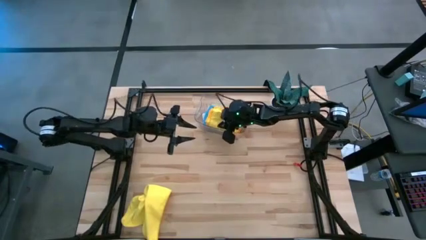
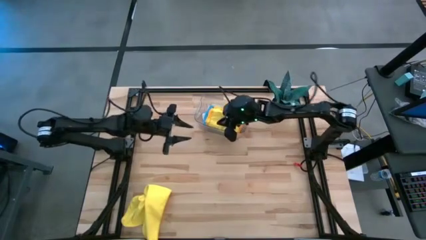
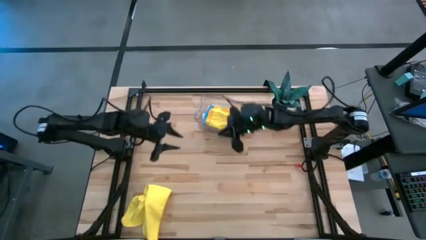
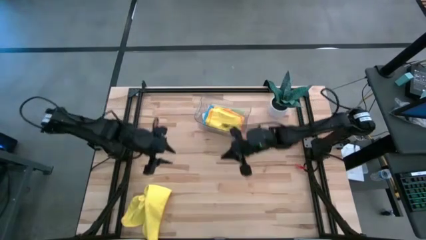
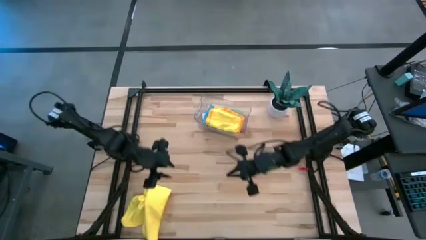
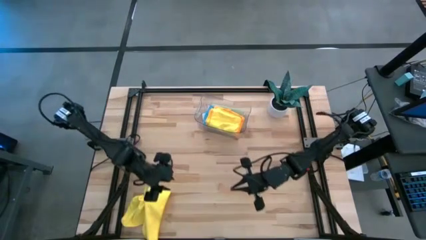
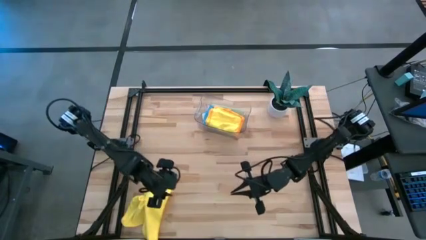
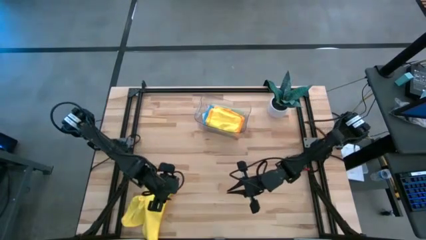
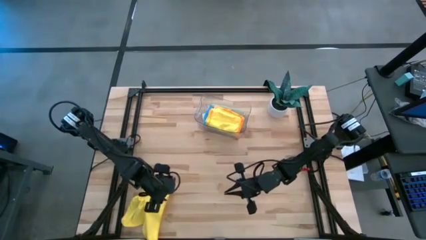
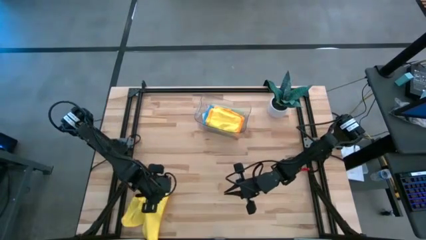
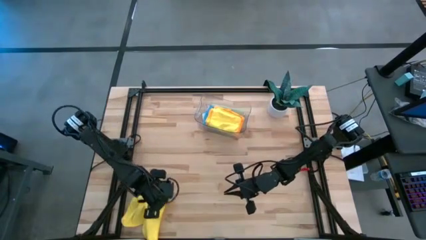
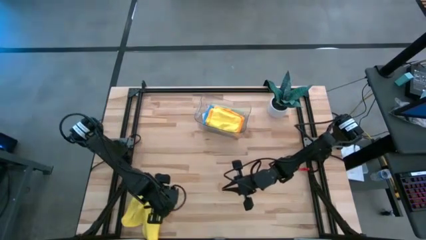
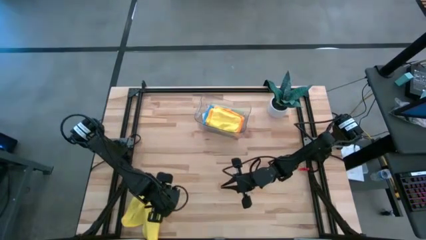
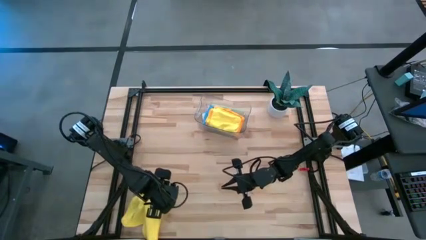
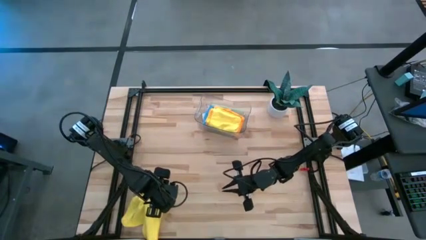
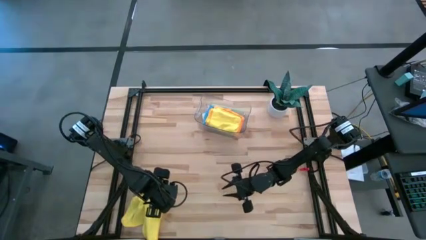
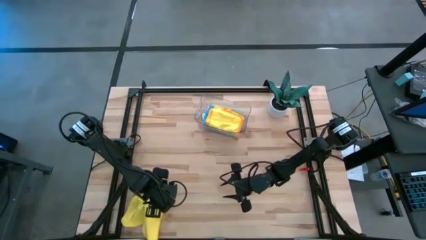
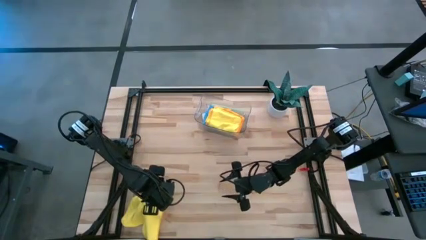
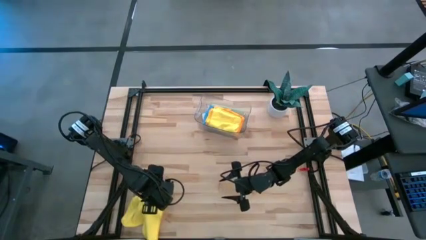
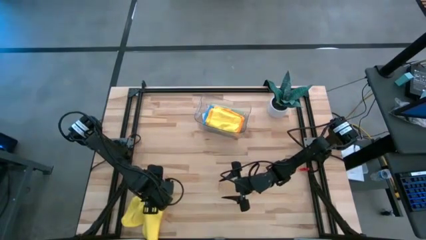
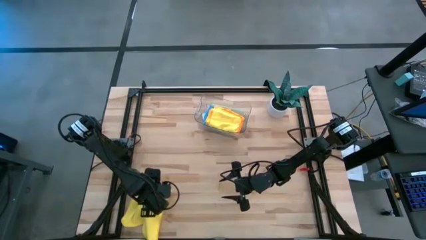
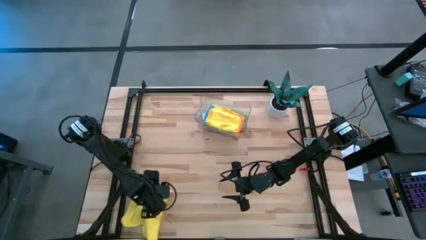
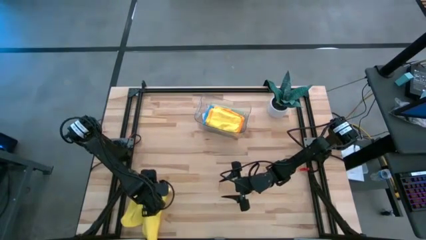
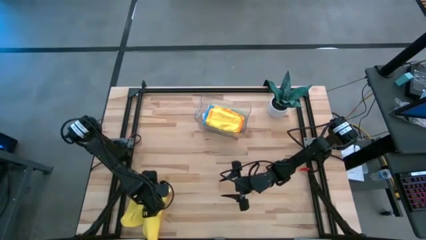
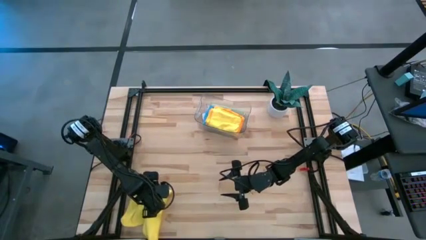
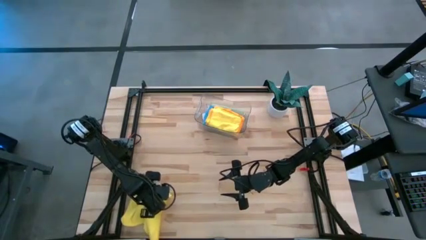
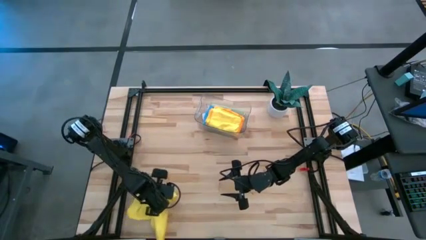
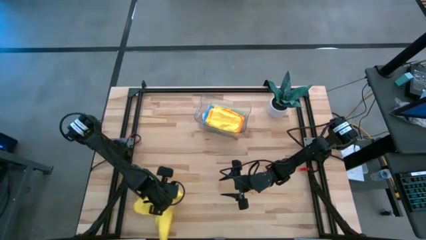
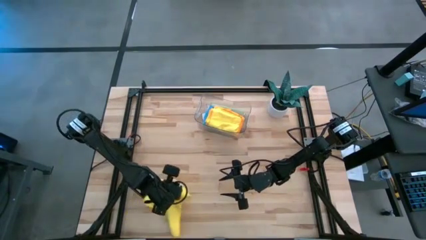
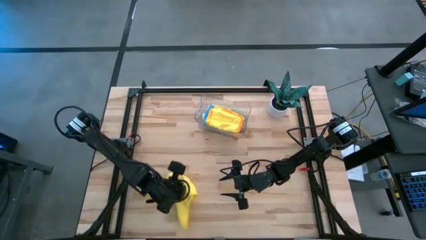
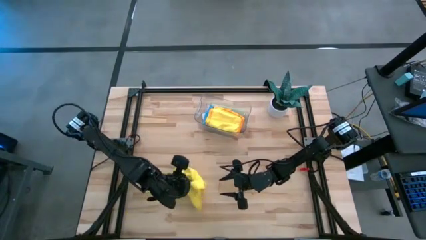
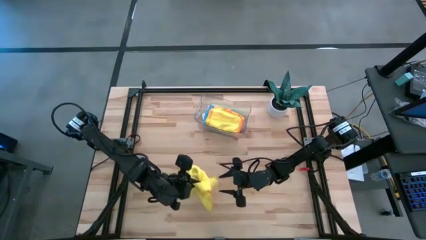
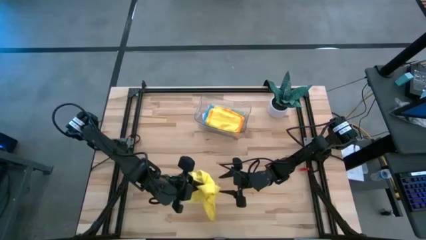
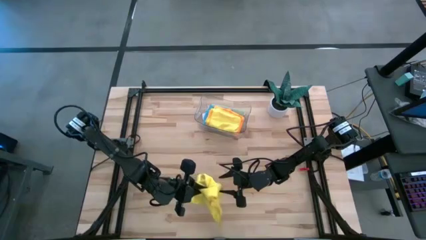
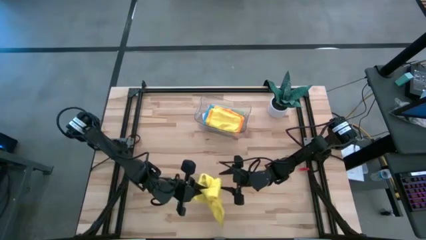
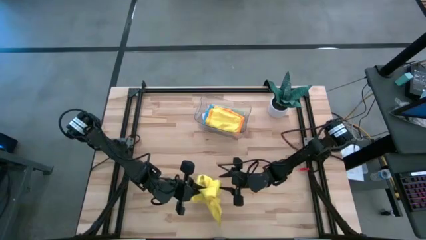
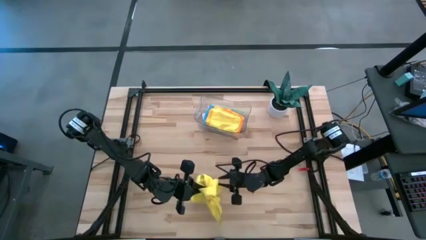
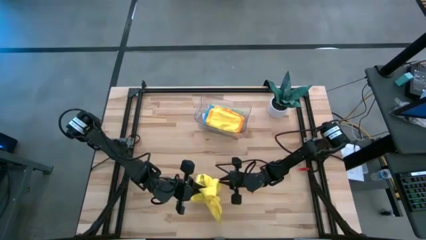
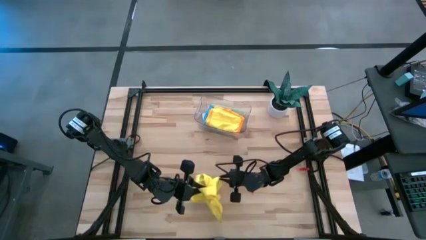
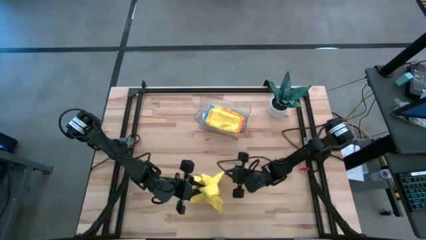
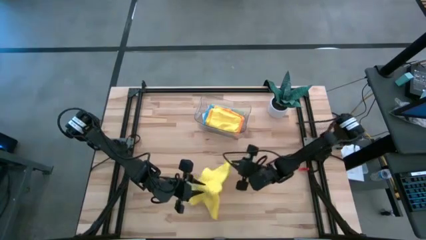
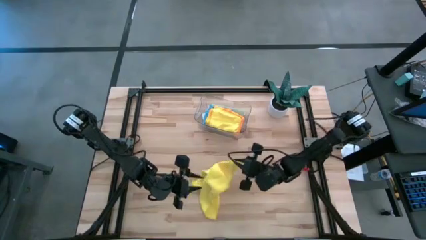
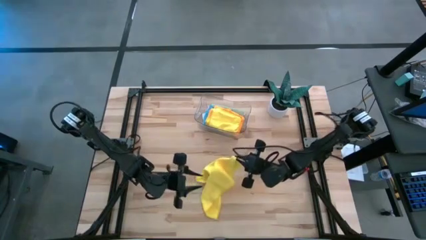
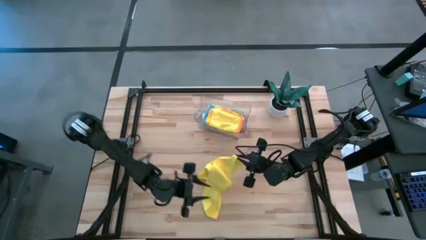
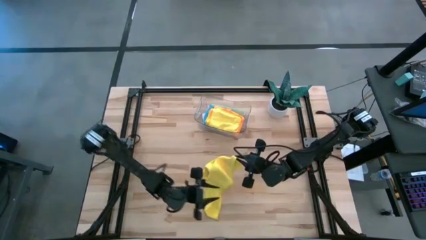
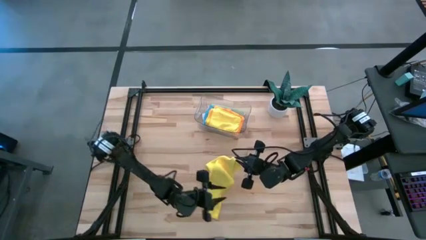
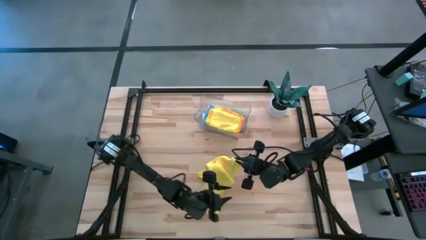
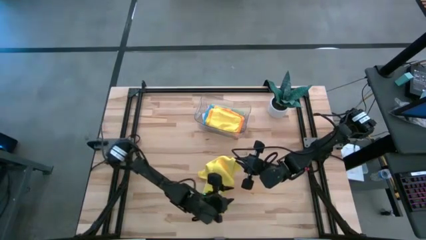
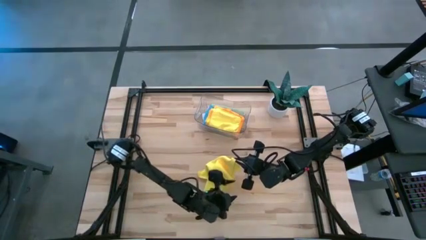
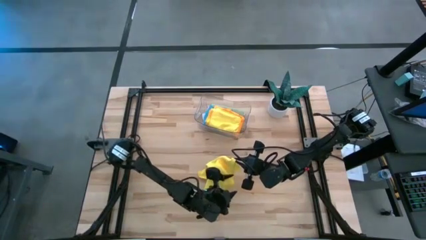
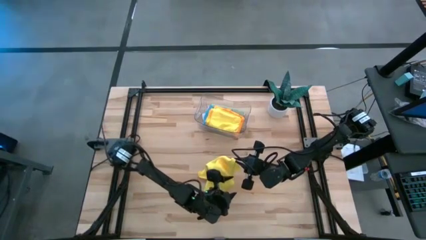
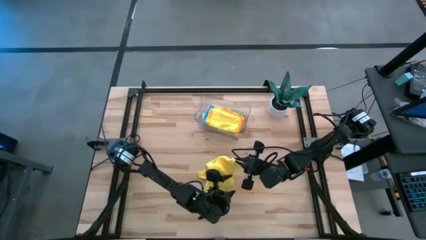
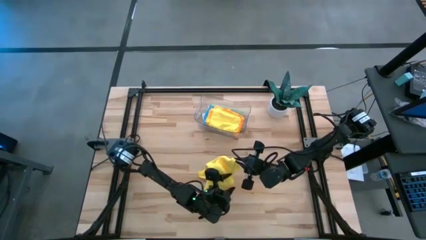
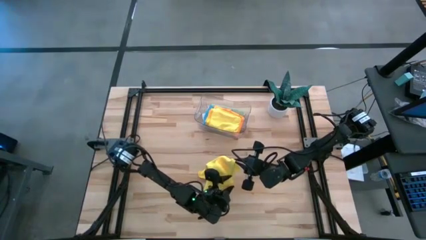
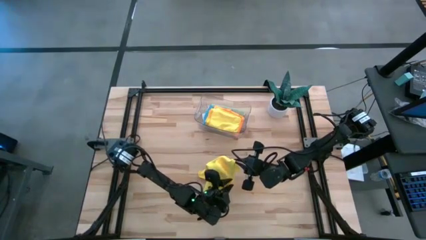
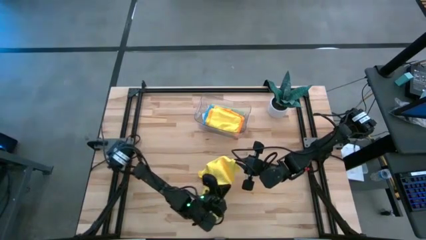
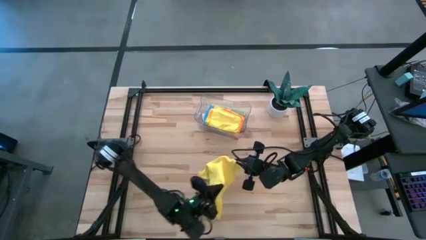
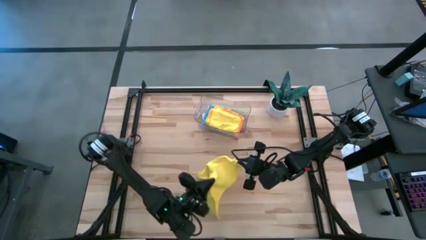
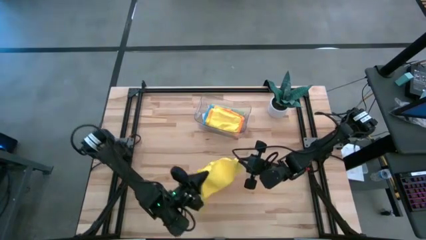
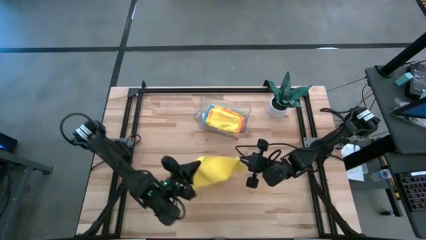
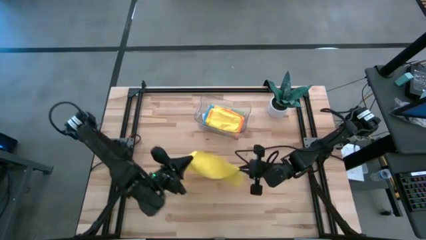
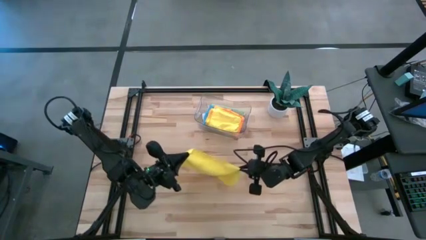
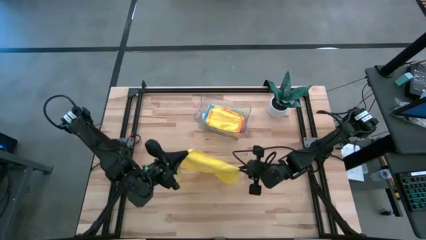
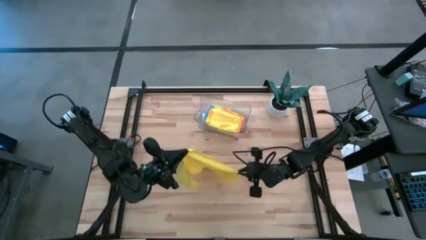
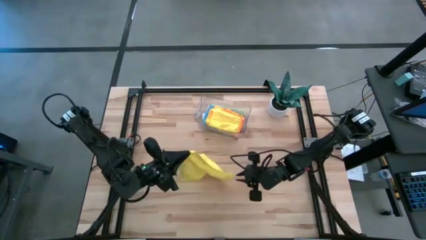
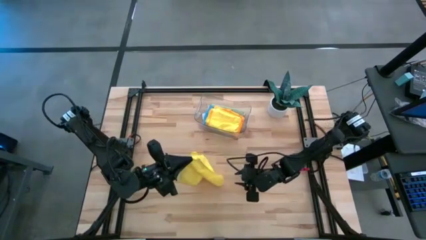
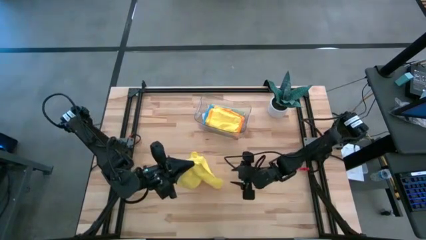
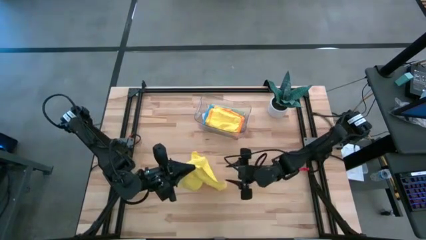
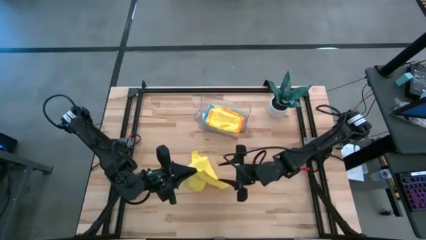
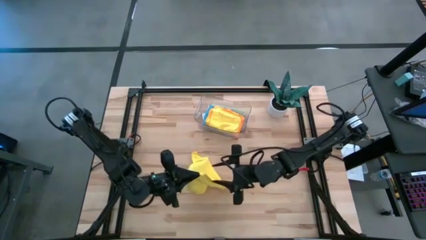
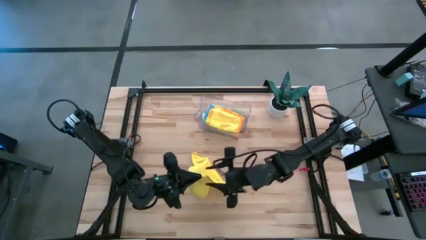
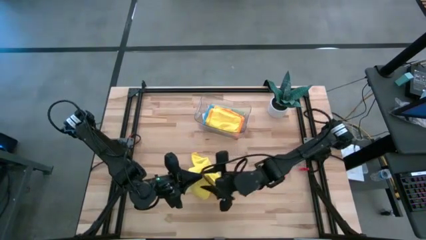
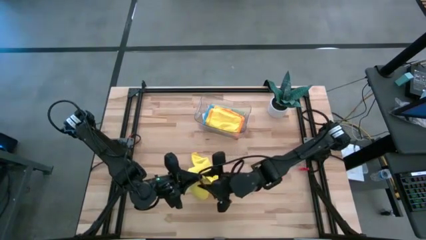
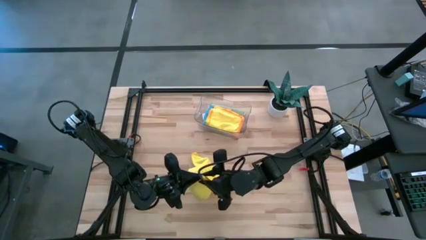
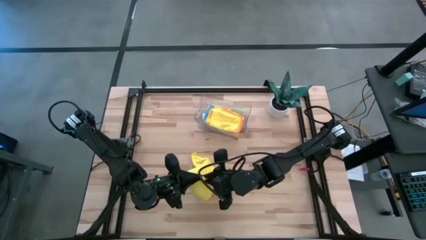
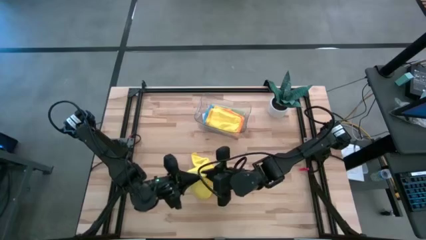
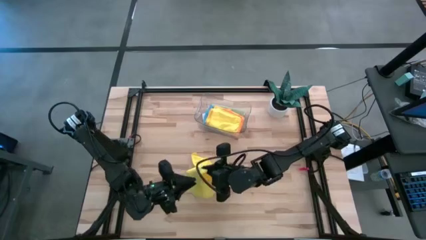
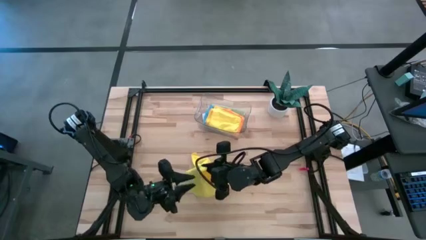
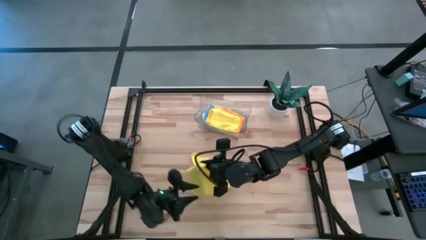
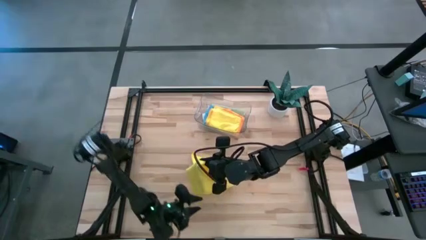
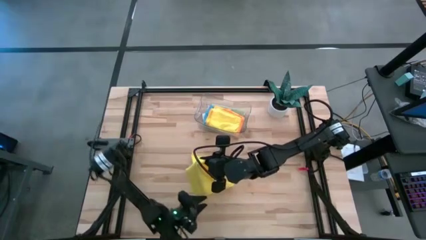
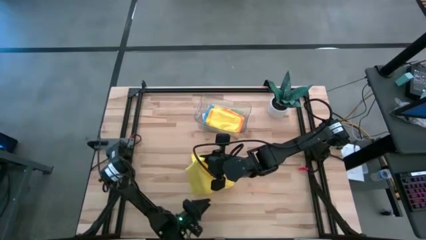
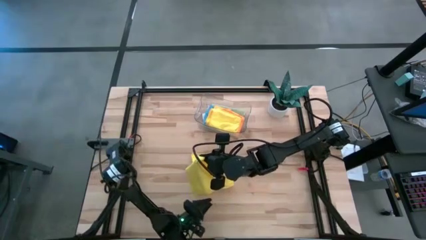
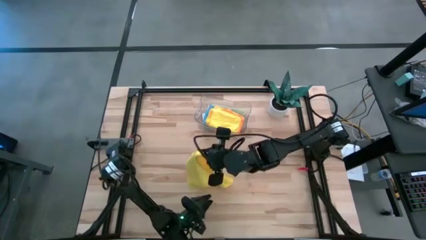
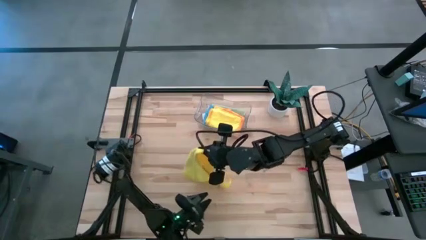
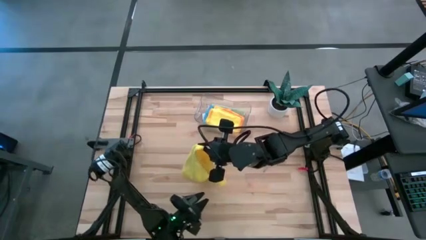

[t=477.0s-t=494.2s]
Task: Fold microfiber towels
Fold the yellow towel
